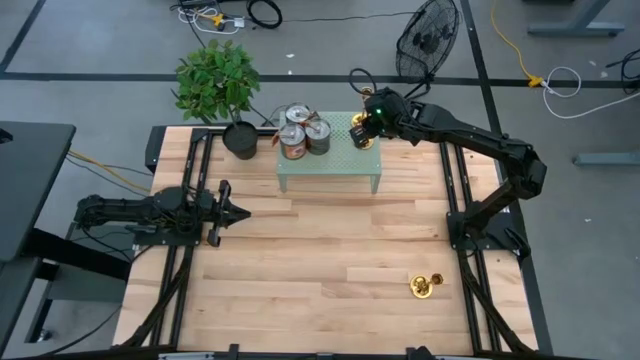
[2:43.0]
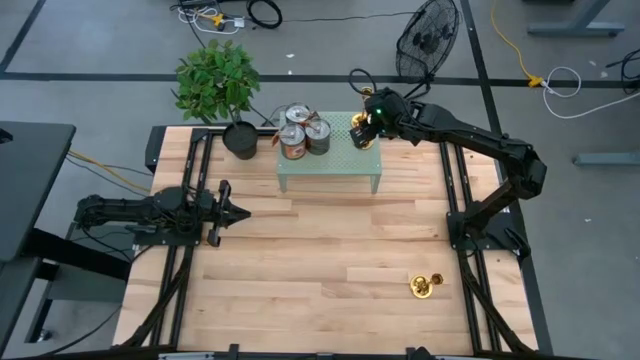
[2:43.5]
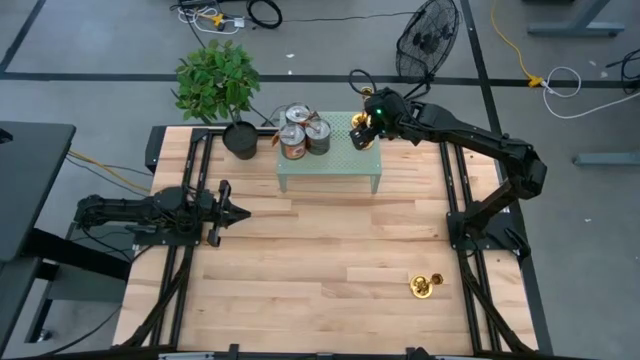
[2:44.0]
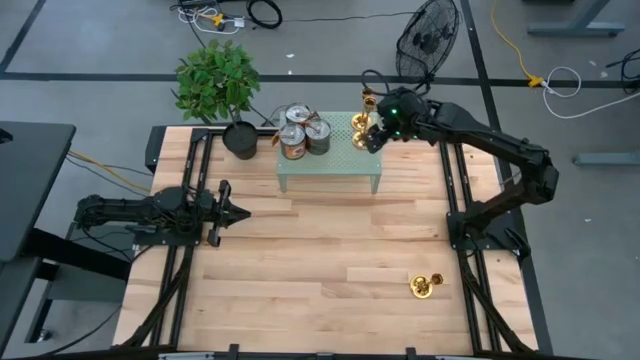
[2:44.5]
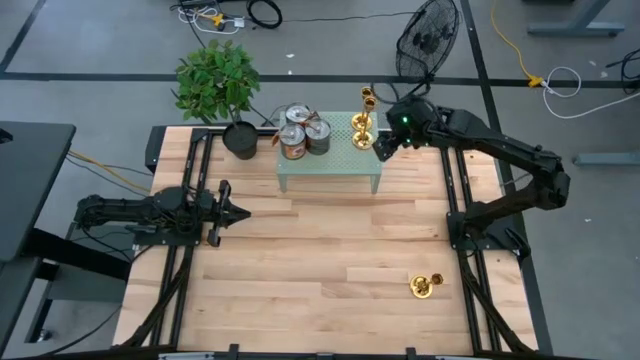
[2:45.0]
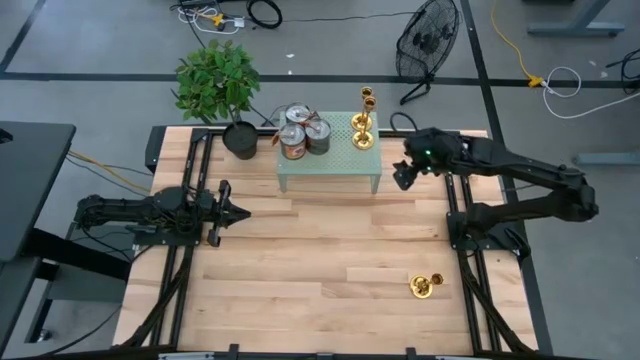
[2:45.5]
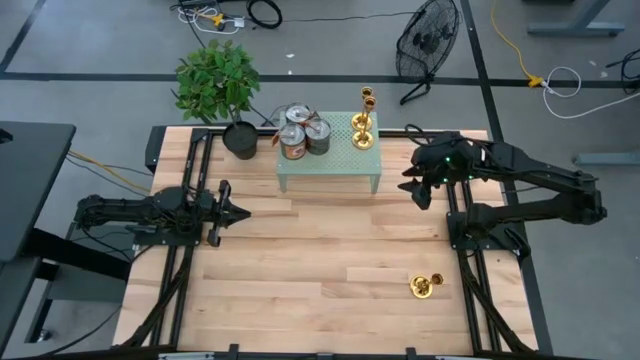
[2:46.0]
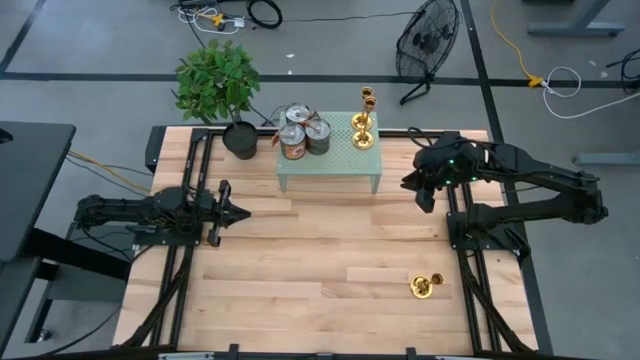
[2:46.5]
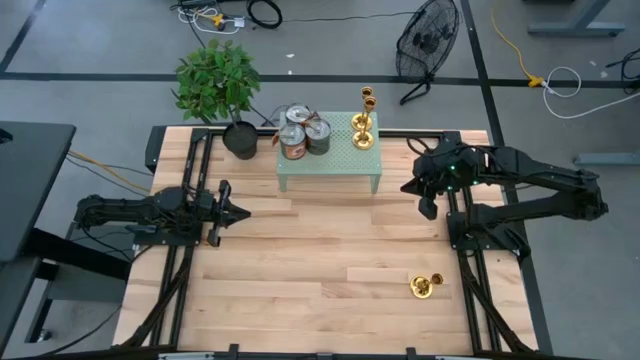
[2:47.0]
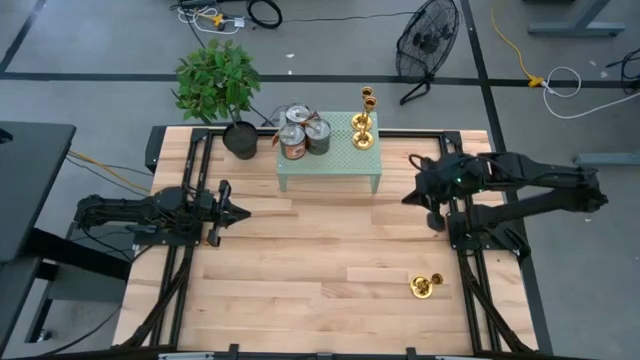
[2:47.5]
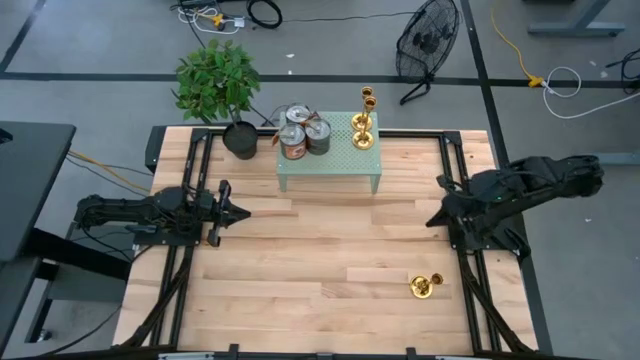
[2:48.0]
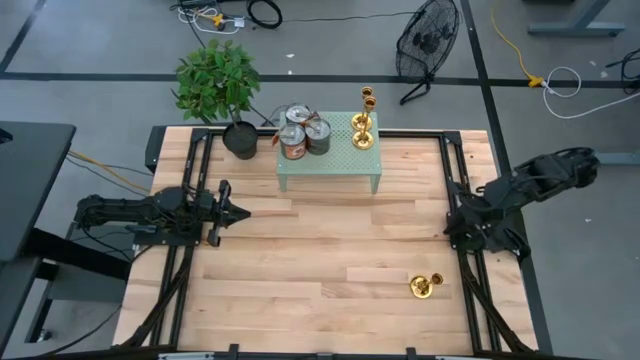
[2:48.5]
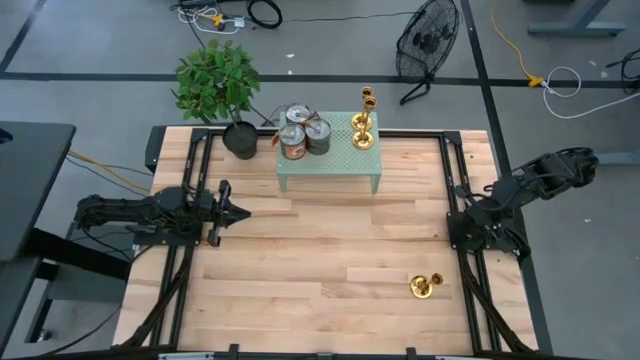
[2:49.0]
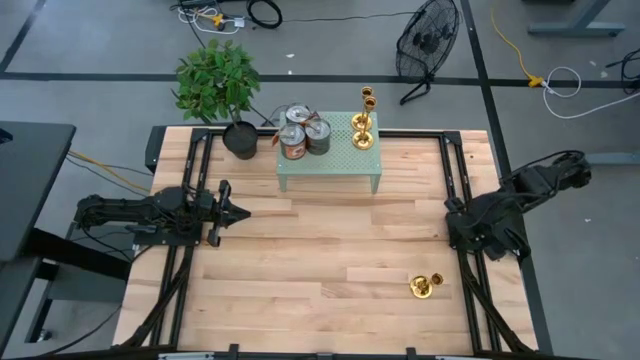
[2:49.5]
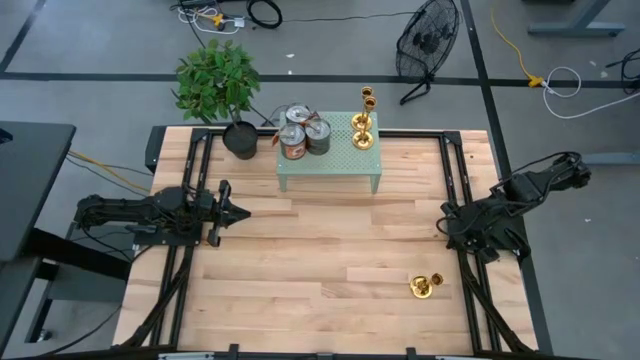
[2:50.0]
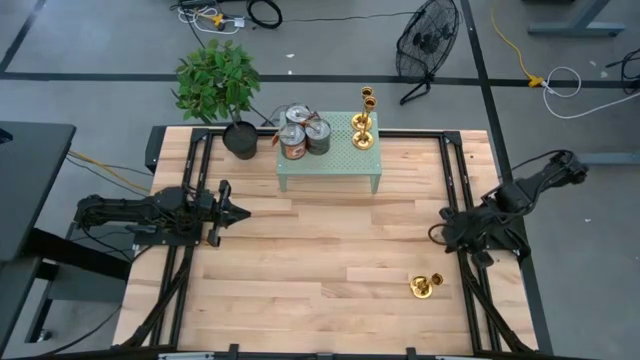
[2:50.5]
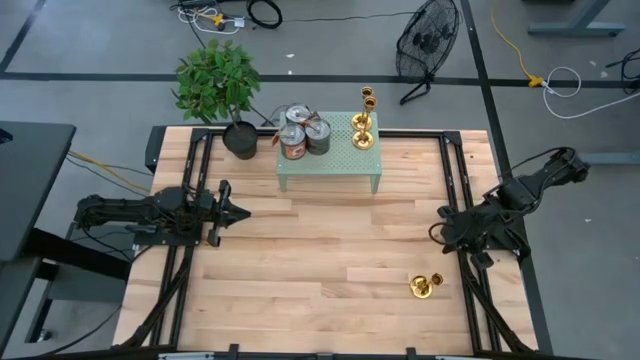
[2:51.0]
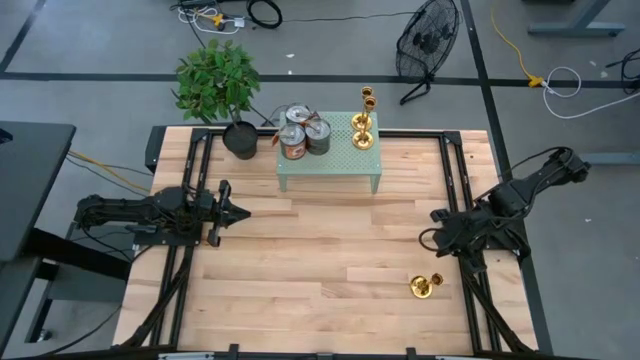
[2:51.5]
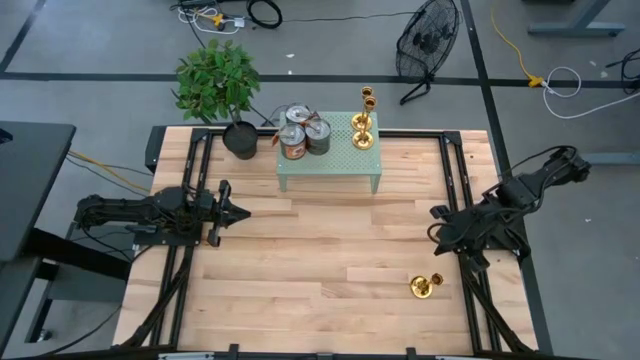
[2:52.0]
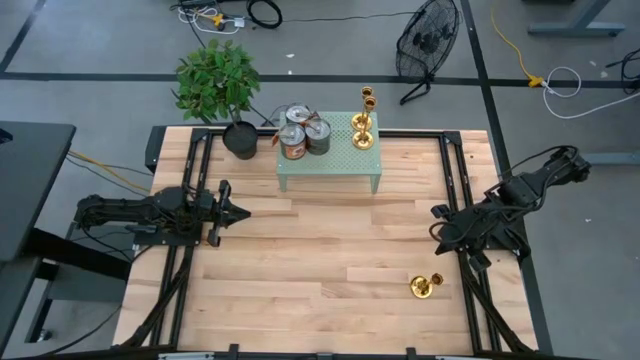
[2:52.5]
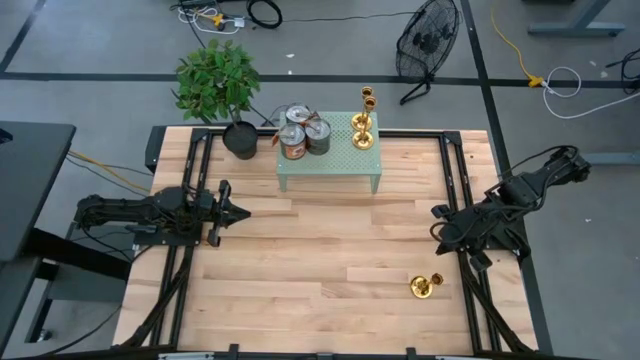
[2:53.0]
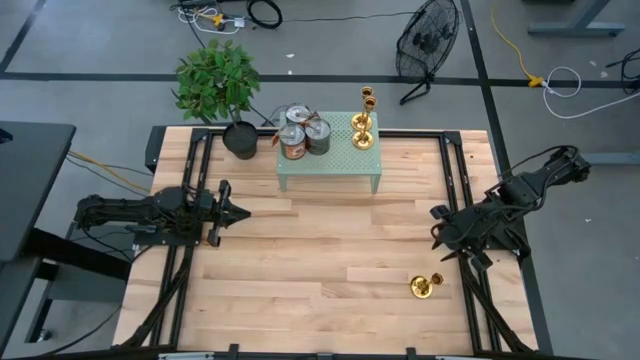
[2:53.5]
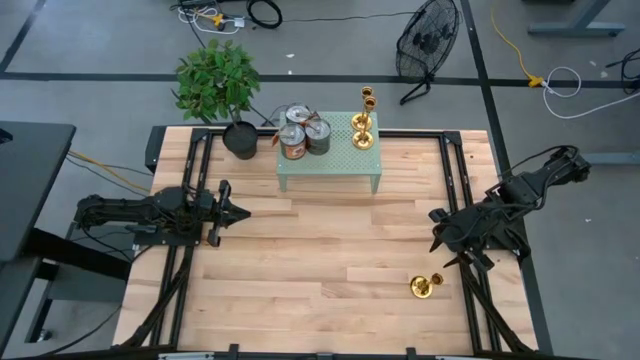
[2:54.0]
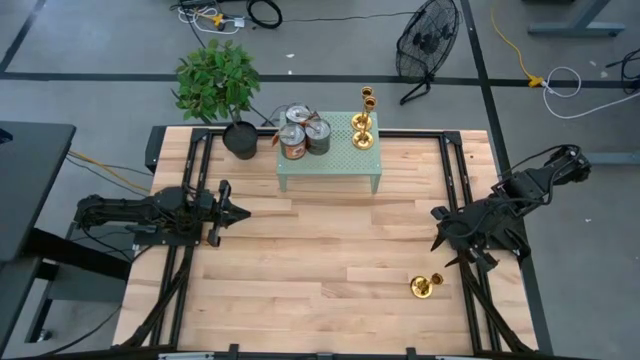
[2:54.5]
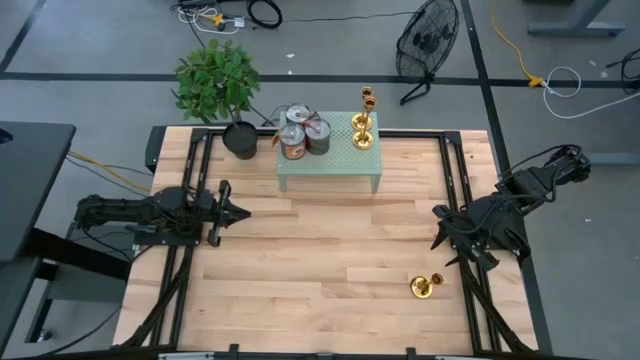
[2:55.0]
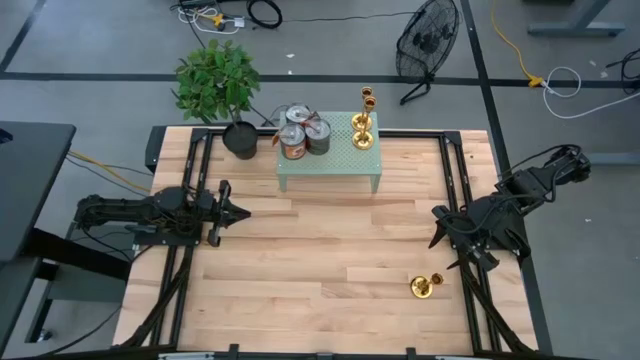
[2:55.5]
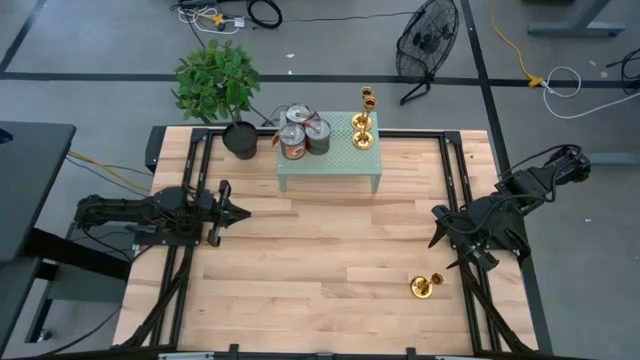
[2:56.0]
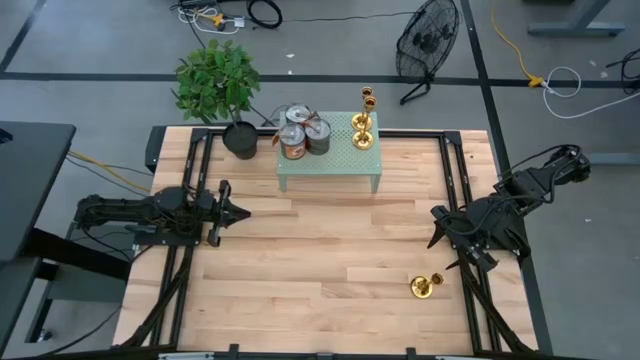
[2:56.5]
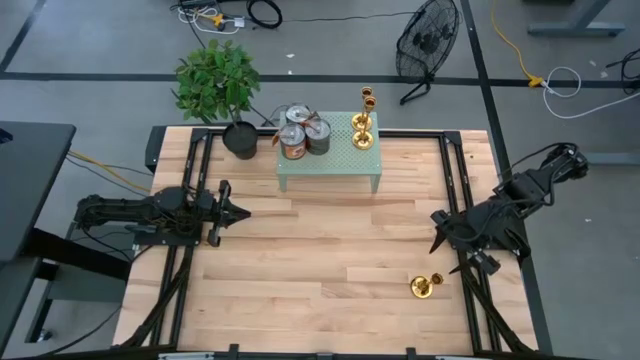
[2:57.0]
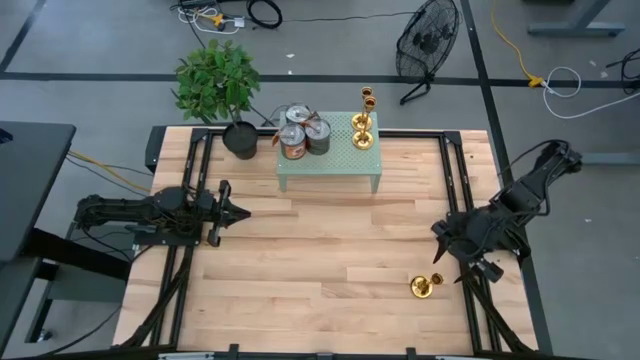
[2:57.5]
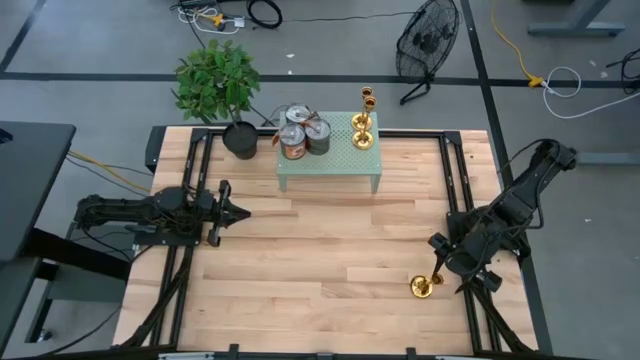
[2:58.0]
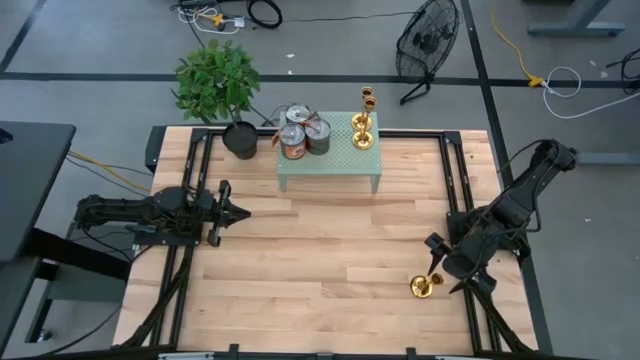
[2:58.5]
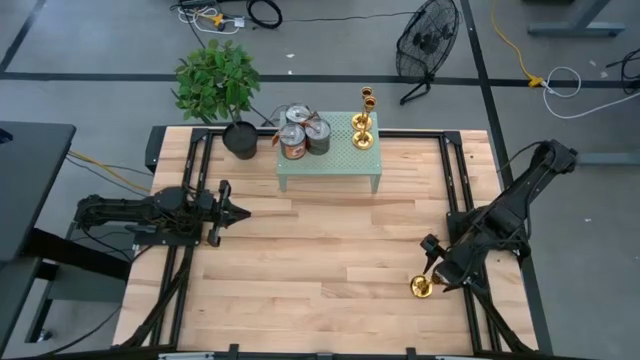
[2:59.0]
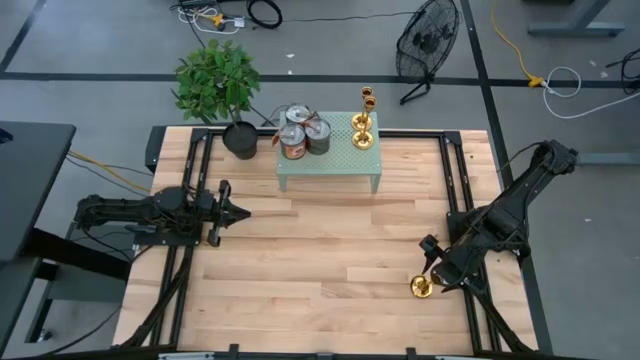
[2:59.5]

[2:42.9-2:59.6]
Task: Pick & Place candle stick holders
Put the gold candle holder on the shelf

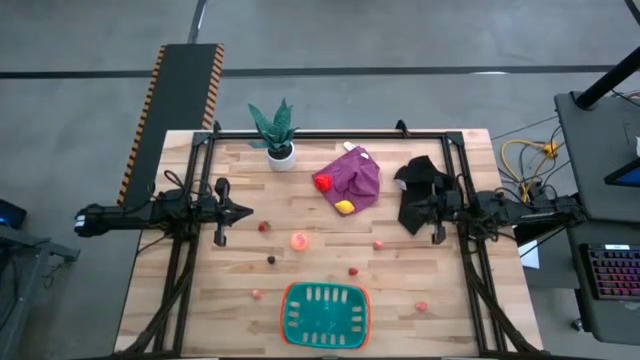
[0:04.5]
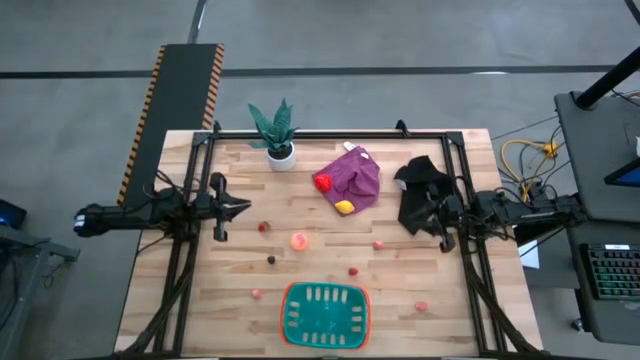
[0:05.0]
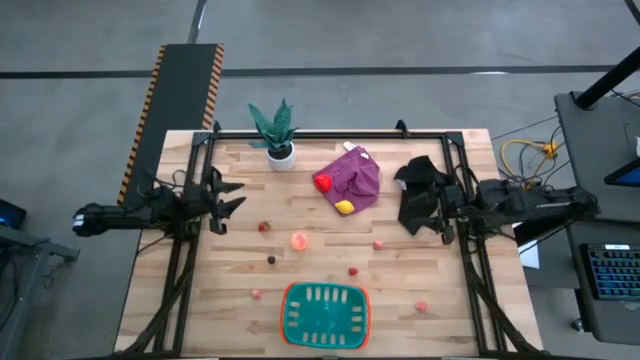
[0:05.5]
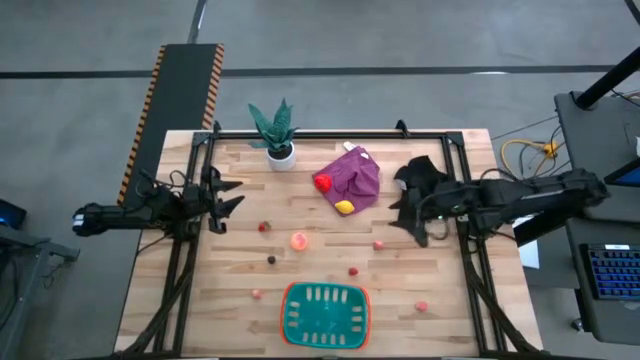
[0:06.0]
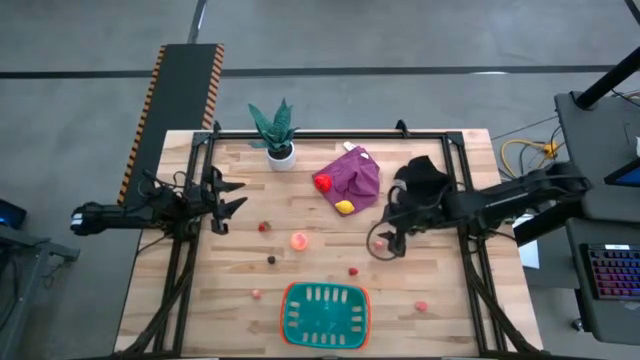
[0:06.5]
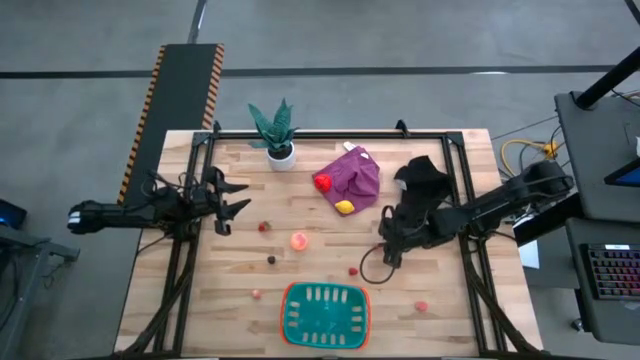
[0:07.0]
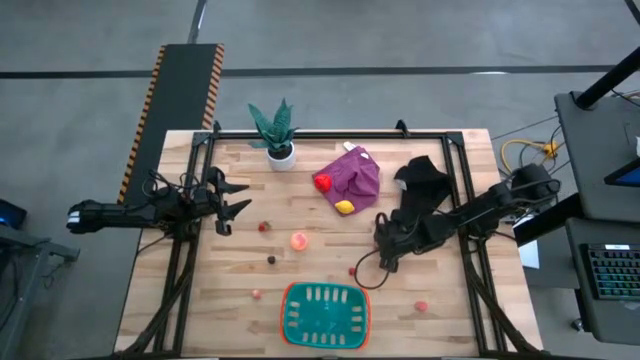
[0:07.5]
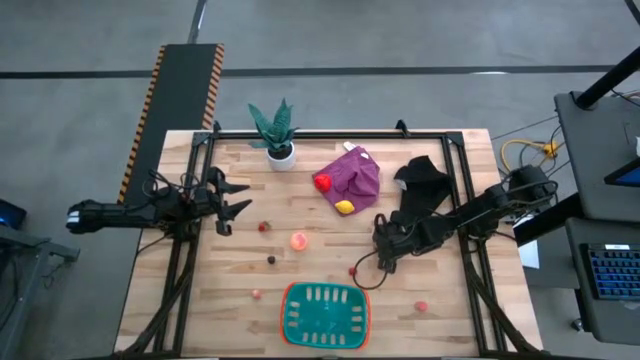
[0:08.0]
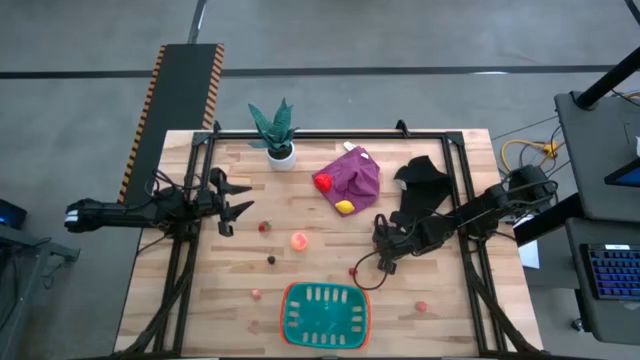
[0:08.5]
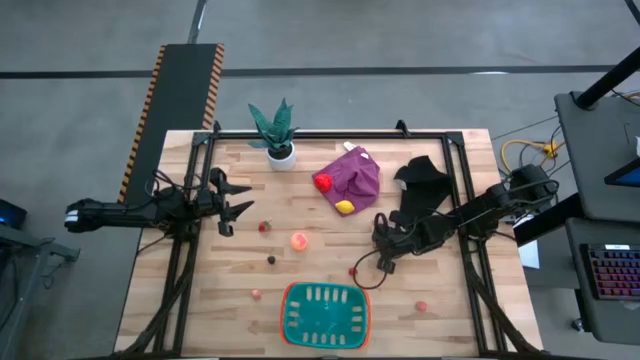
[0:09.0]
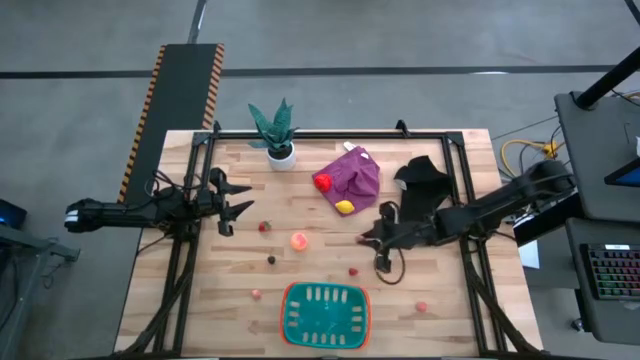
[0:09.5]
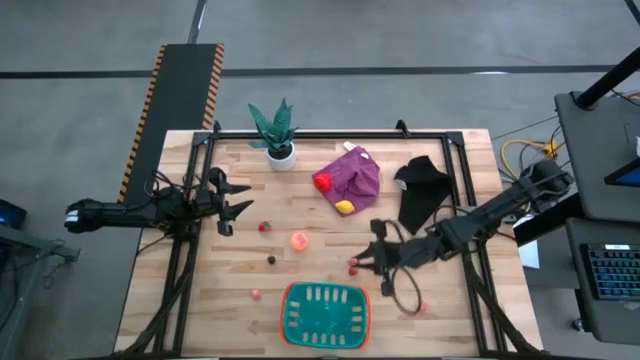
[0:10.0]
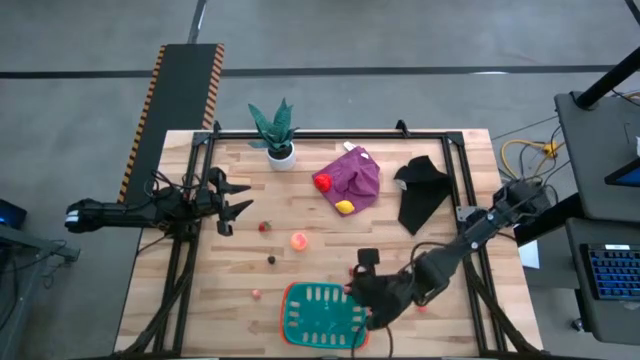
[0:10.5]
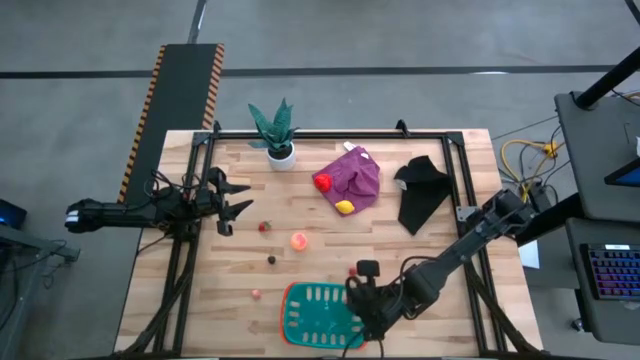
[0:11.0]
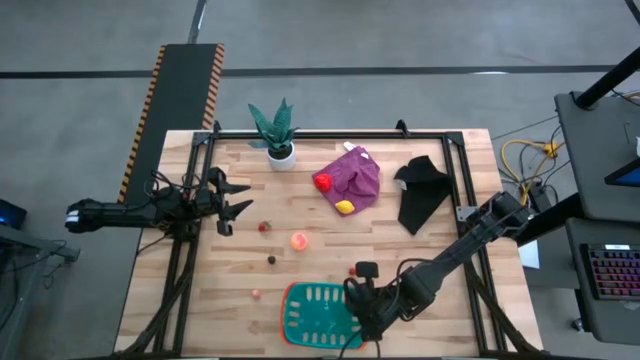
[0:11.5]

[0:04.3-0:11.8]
Task: Pick and placing Produce into tupperware
Put the pink peach into the green basket
